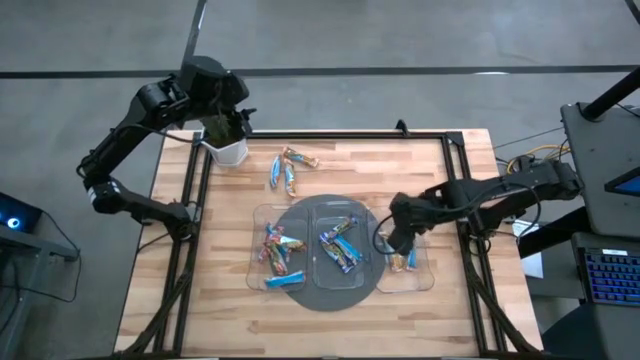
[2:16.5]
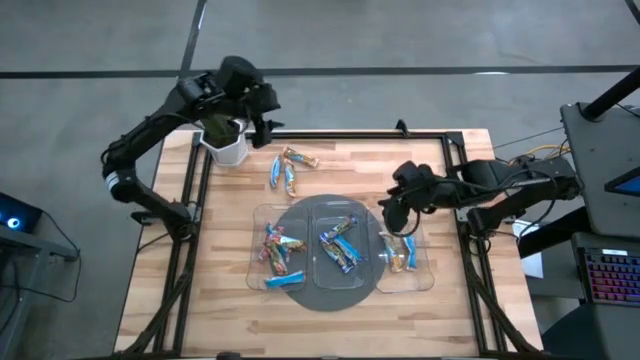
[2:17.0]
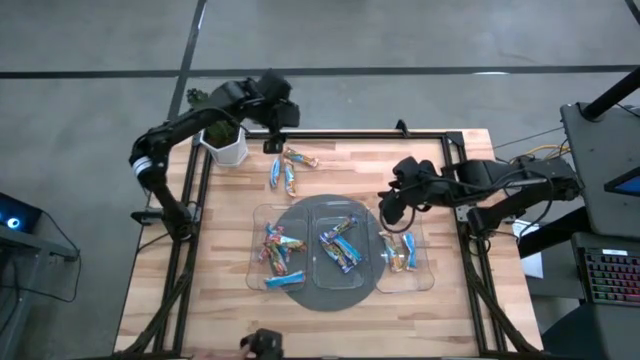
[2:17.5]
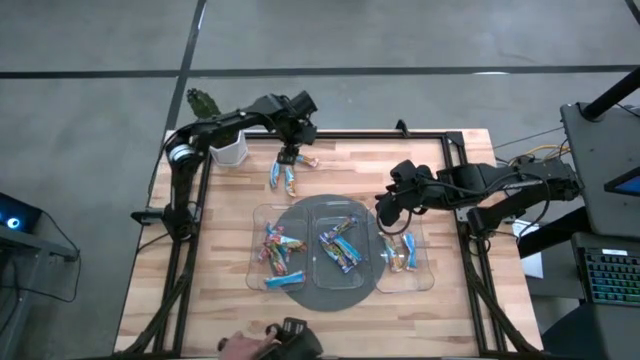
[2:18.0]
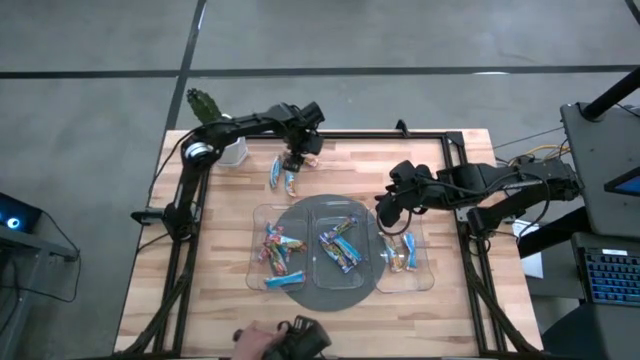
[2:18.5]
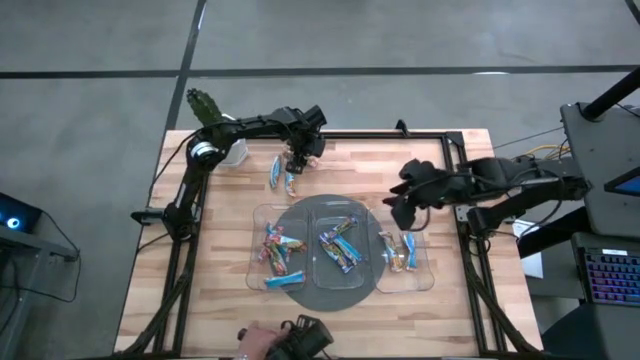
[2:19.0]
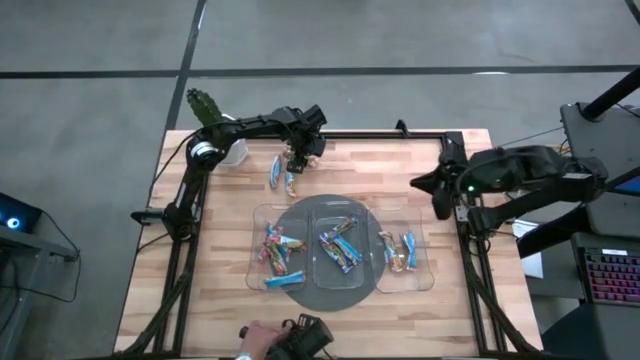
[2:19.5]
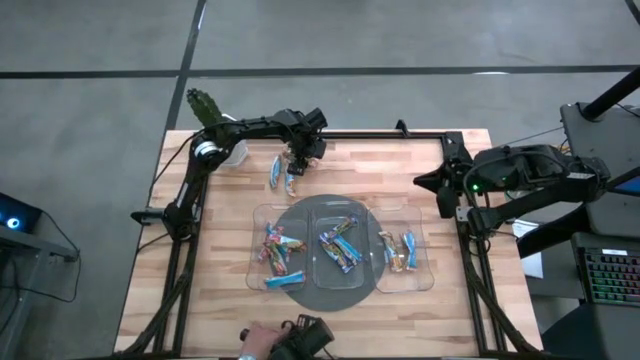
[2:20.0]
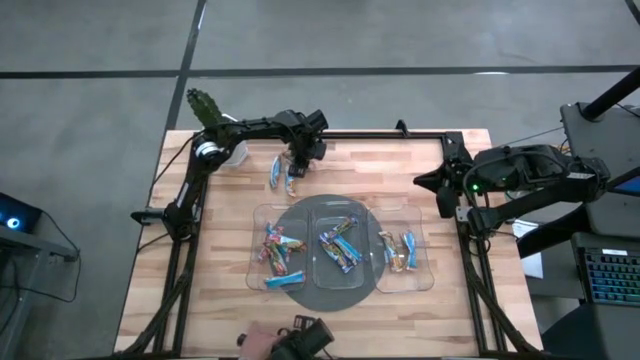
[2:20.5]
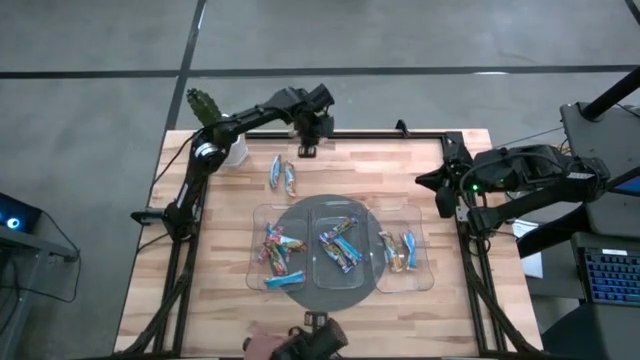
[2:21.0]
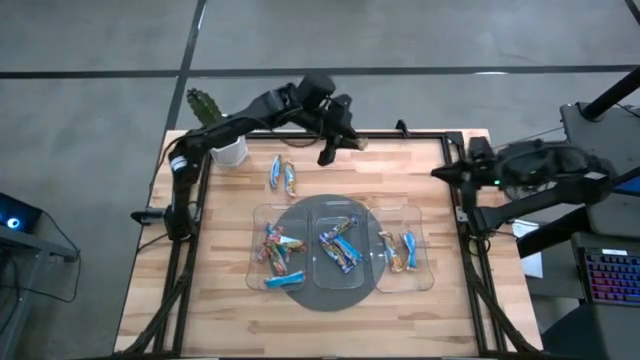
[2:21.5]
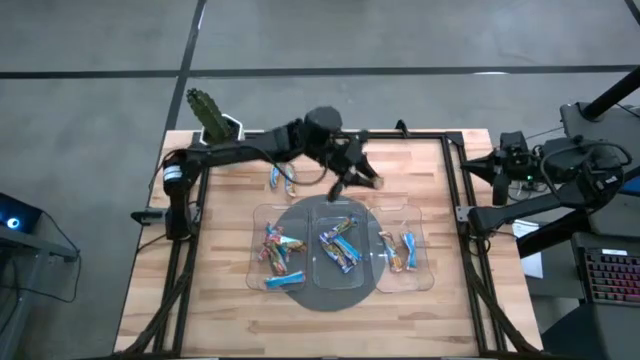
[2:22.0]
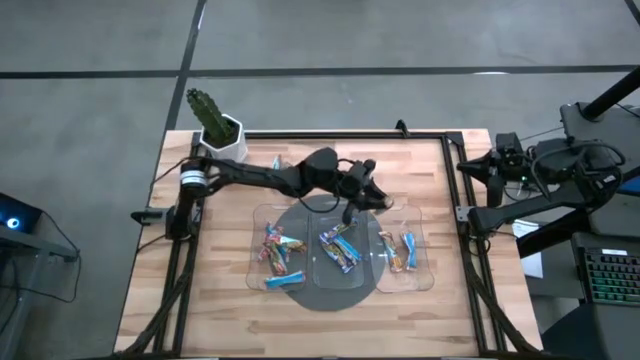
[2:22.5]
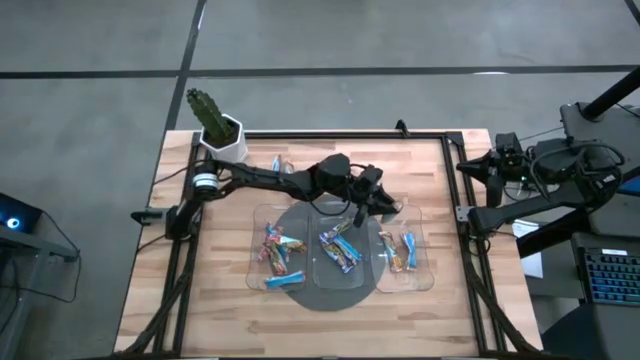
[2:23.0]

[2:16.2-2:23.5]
Task: Pick and place Granola Bars by type
Put the yellow granola bar into the right transparent bin

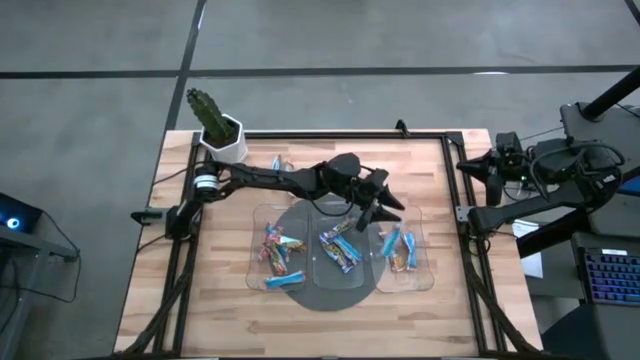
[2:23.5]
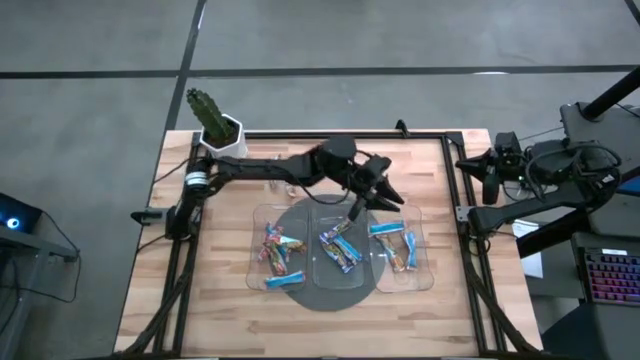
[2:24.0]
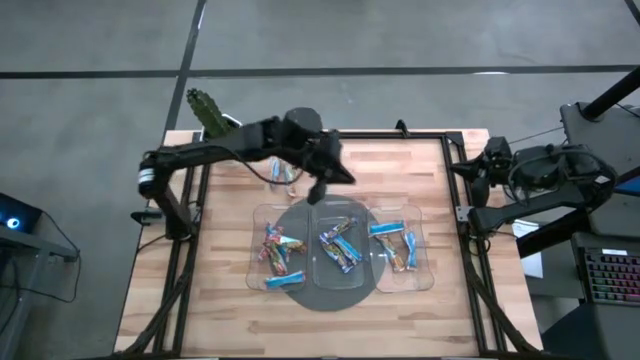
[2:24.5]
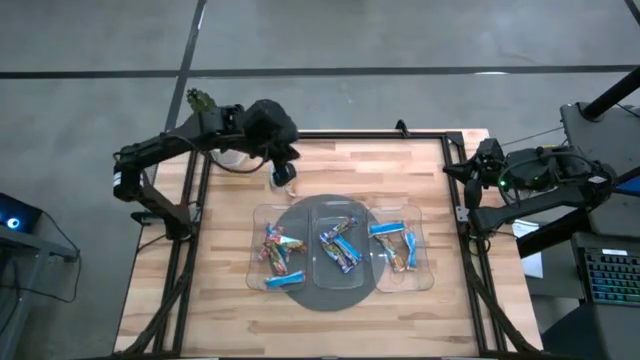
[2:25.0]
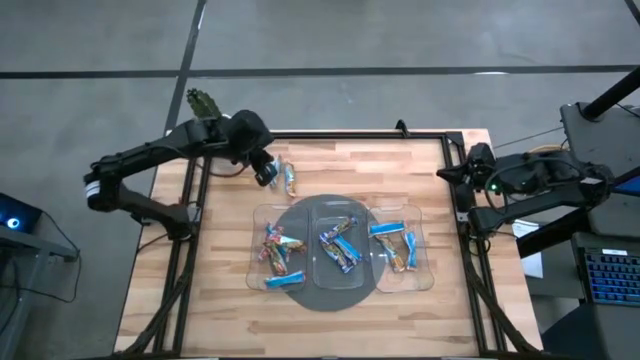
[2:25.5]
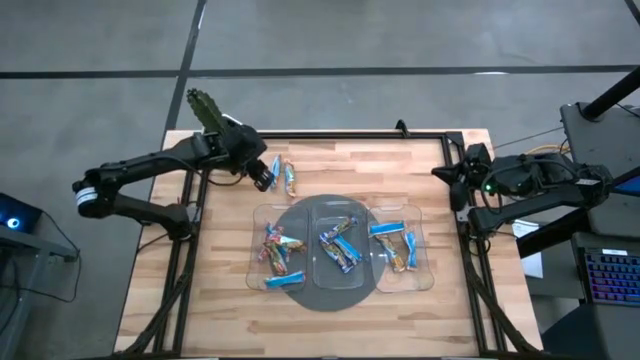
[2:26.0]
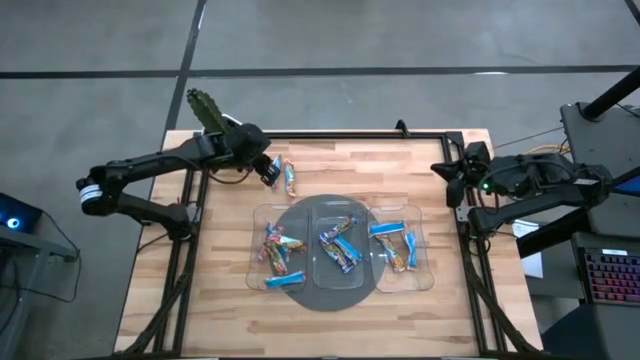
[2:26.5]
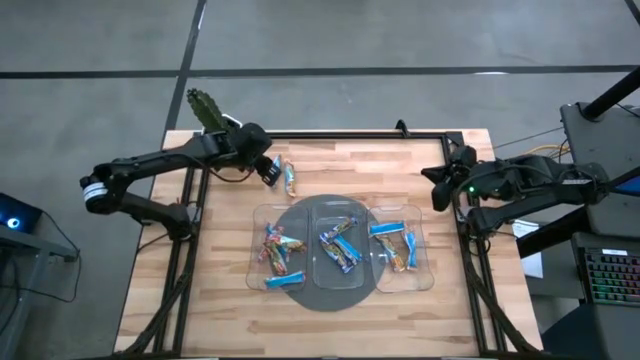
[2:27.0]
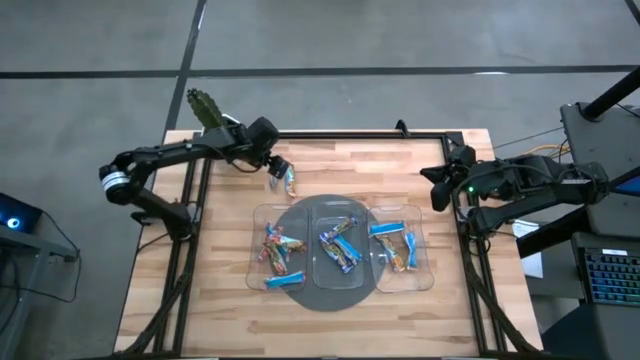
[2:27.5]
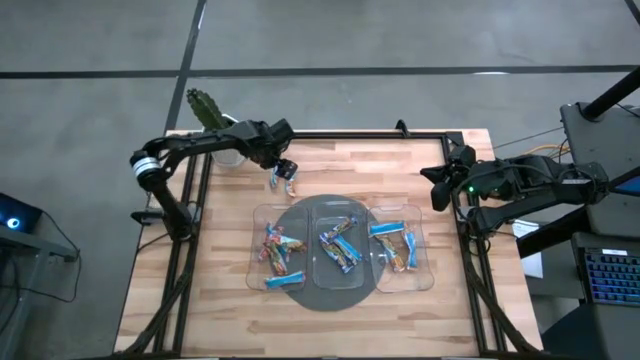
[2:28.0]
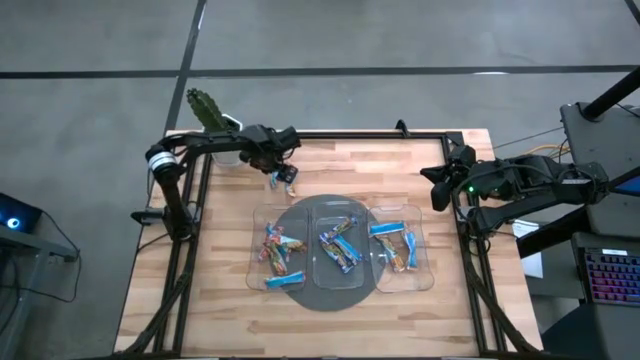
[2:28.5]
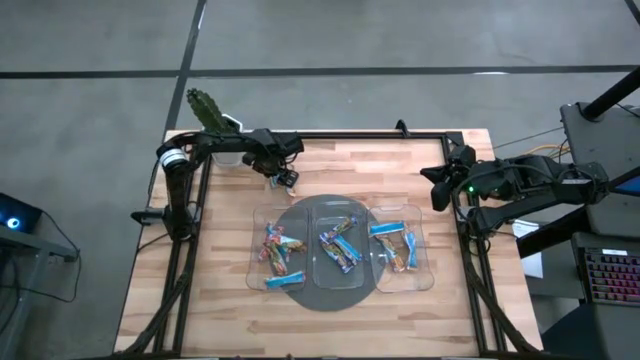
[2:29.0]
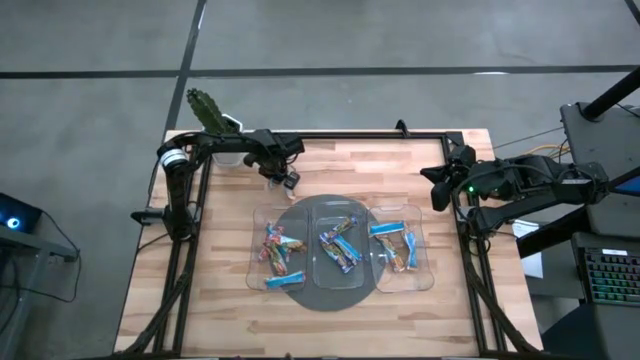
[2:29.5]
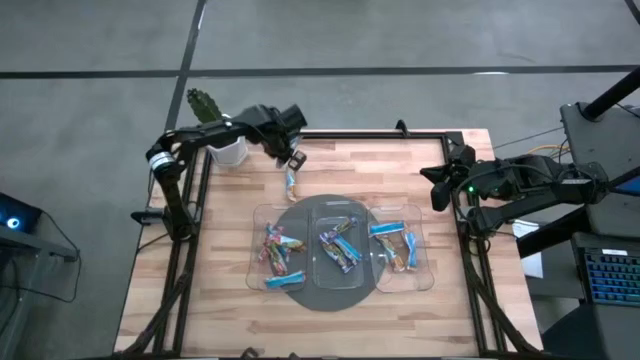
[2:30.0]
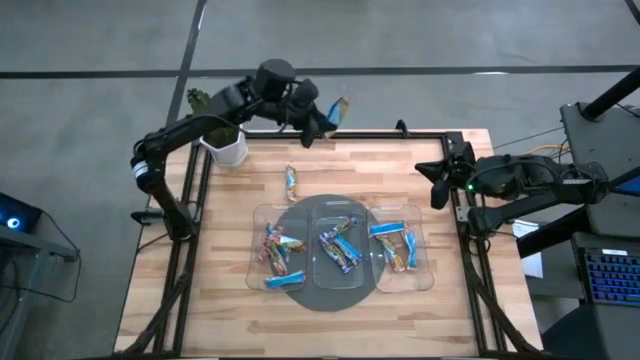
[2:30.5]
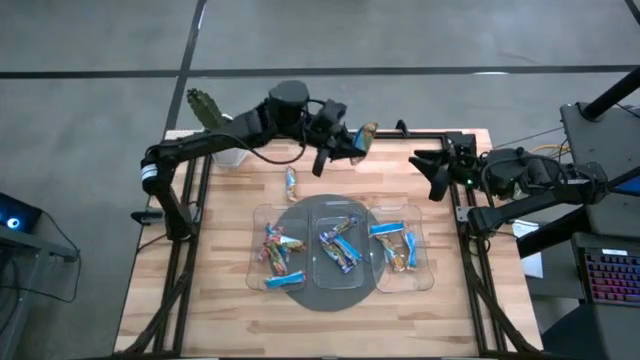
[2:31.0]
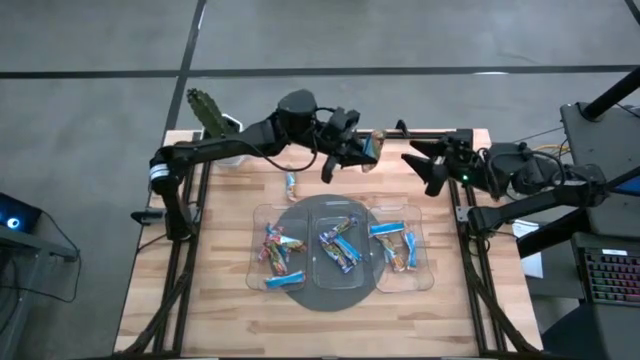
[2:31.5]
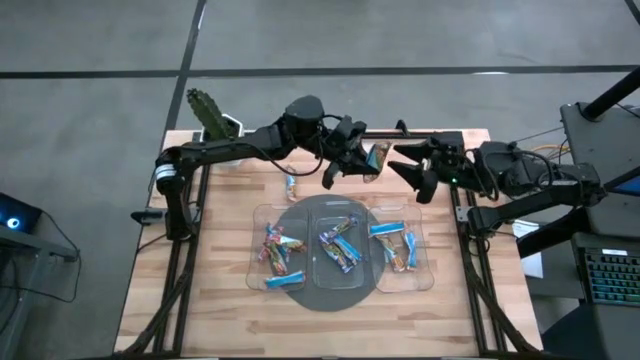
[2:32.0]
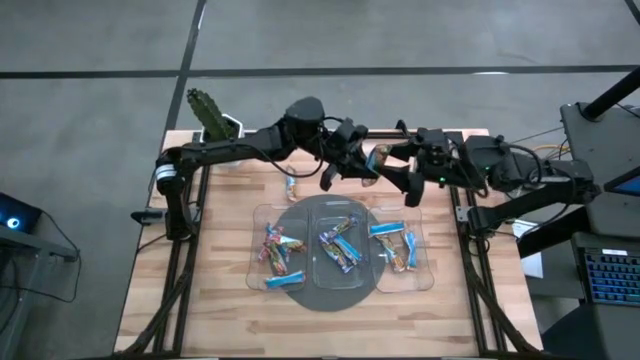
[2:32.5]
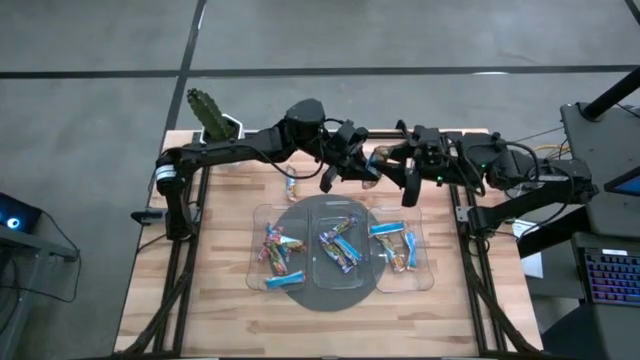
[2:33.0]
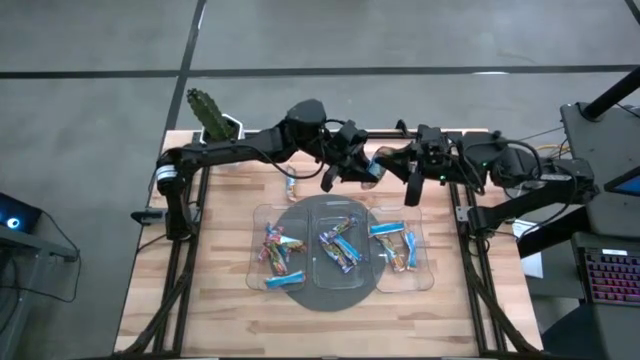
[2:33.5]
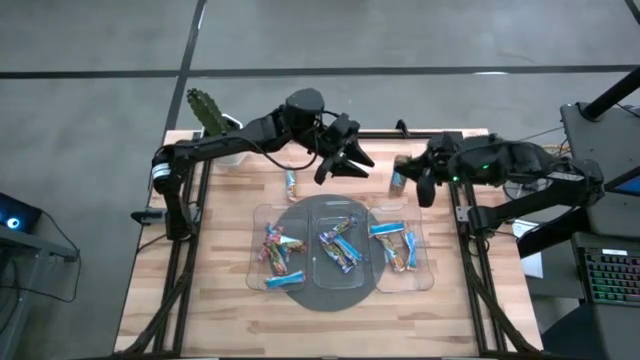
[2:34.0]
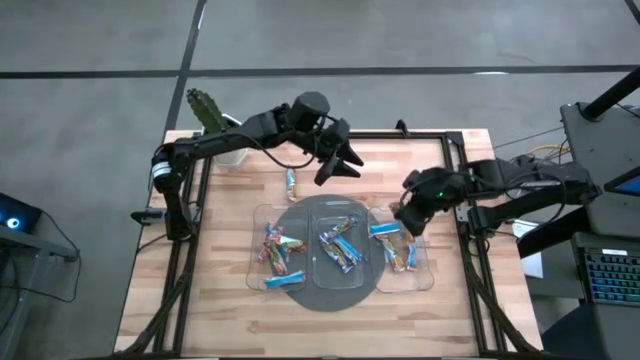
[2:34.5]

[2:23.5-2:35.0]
Put the yellow granola bar into the right transparent bin

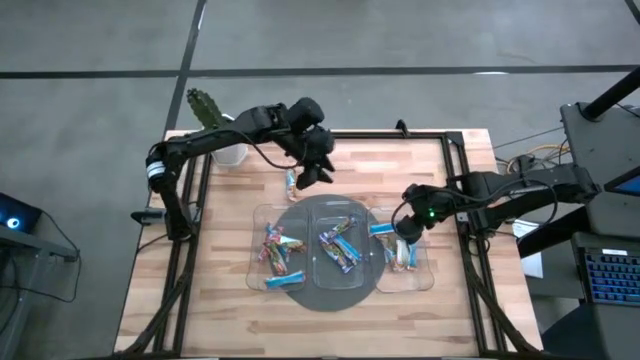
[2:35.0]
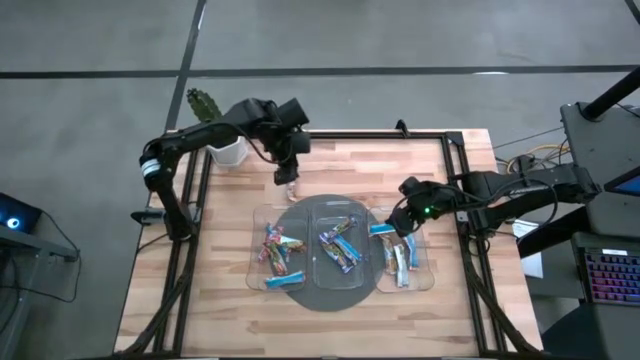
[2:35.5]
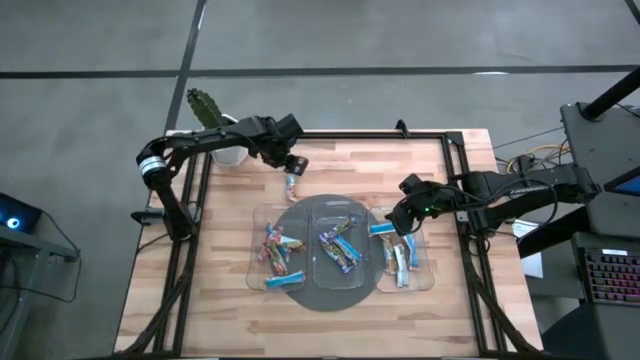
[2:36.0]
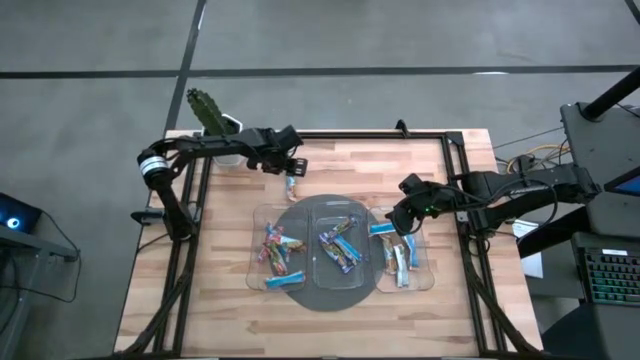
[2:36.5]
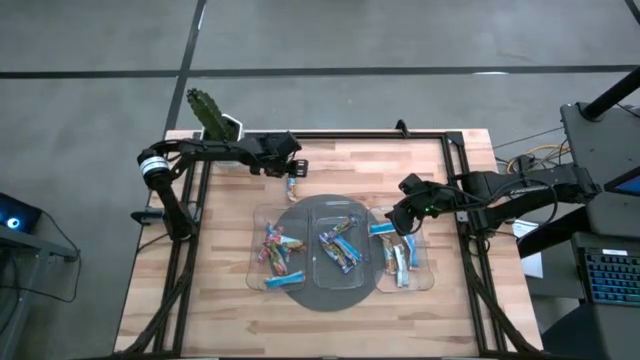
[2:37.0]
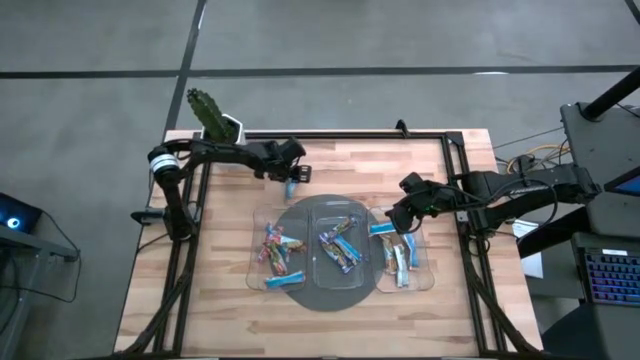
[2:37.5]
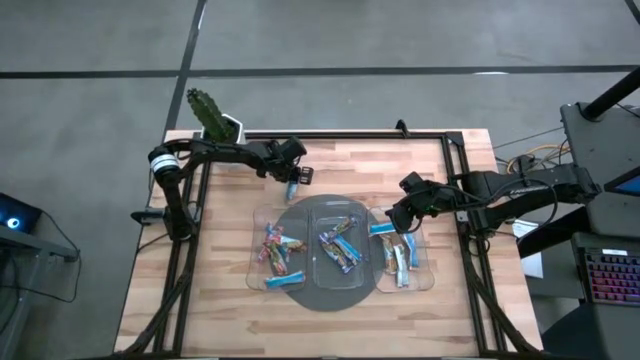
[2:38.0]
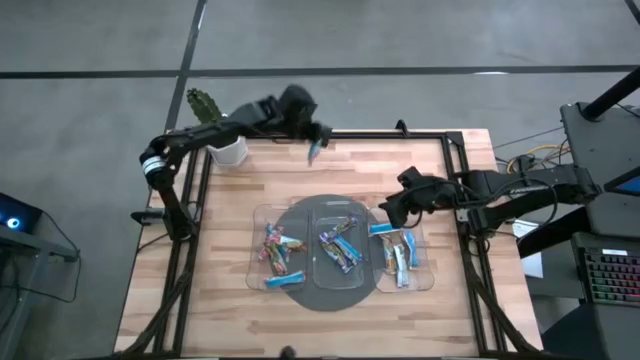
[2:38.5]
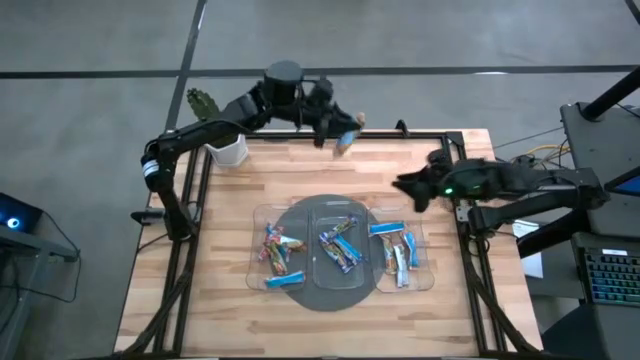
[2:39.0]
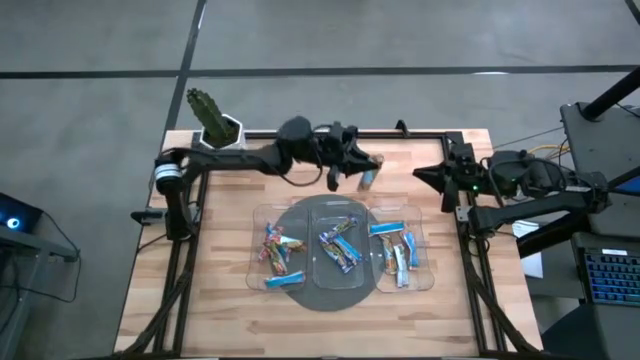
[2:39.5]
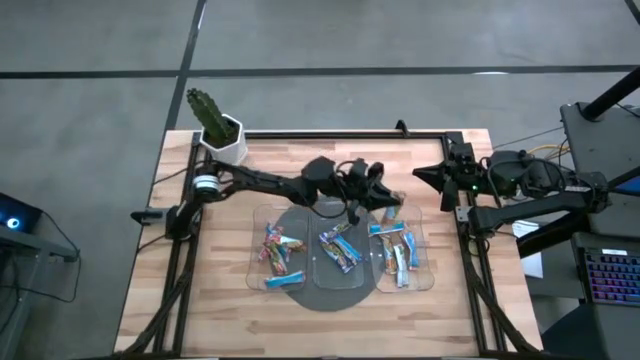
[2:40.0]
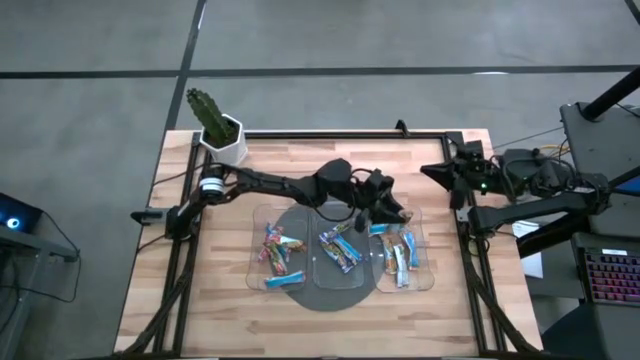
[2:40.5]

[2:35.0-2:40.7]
Put the yellow granola bar into the right transparent bin
